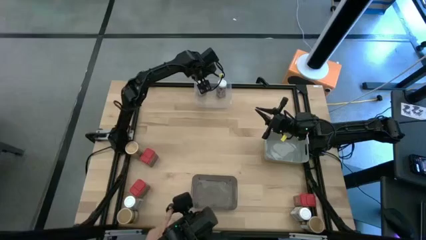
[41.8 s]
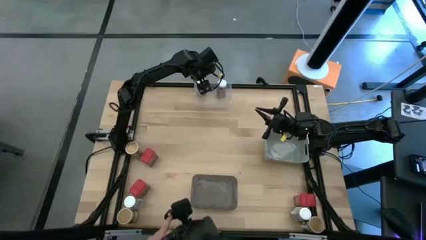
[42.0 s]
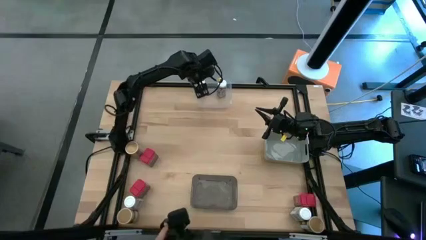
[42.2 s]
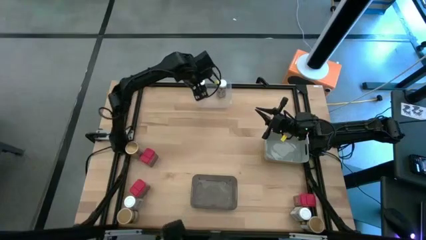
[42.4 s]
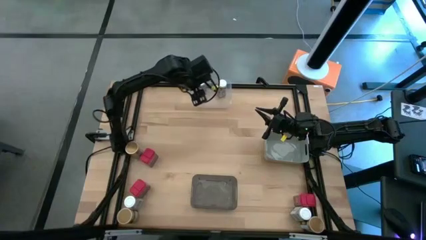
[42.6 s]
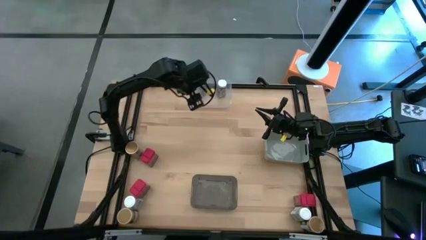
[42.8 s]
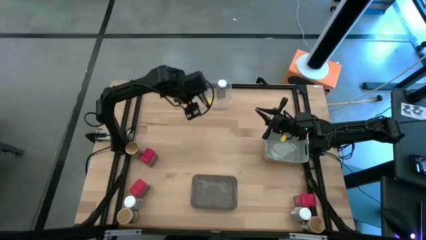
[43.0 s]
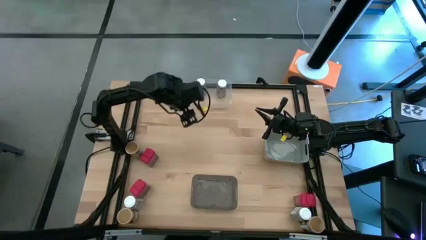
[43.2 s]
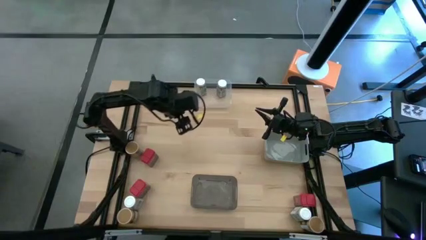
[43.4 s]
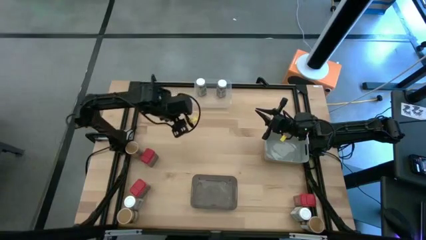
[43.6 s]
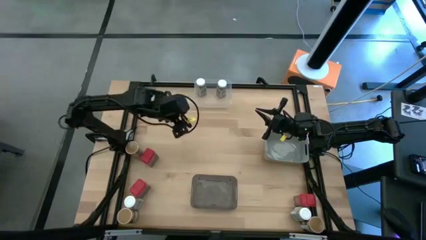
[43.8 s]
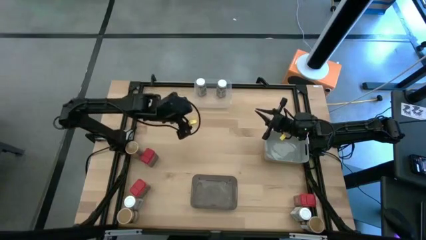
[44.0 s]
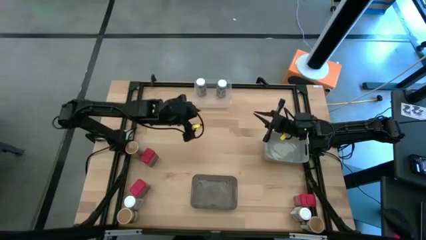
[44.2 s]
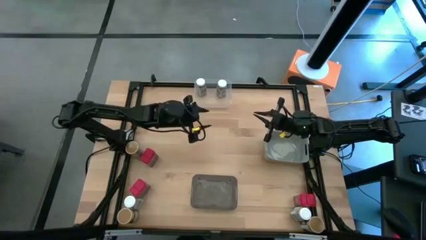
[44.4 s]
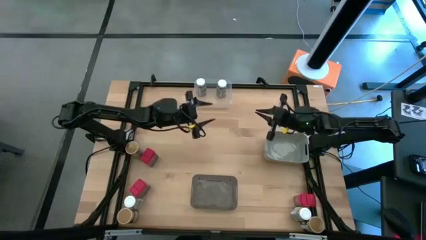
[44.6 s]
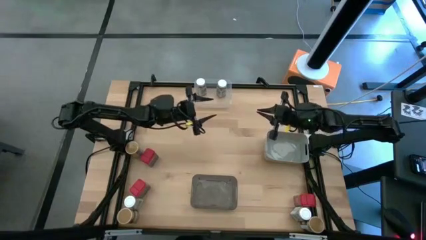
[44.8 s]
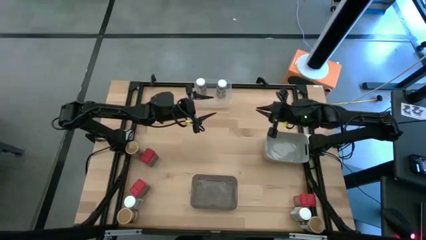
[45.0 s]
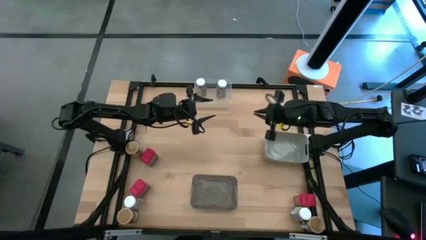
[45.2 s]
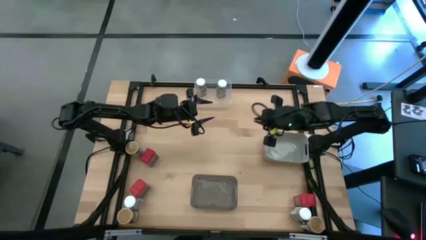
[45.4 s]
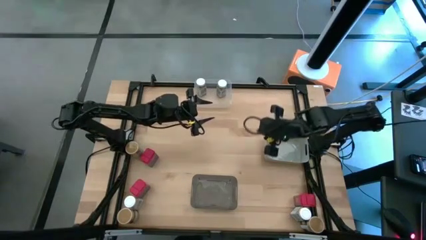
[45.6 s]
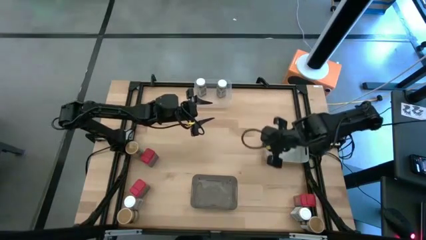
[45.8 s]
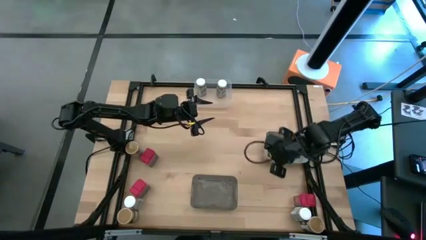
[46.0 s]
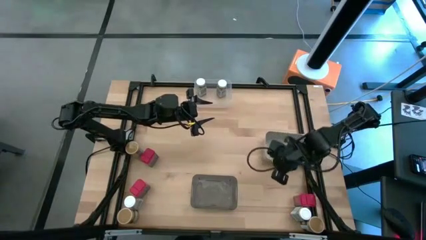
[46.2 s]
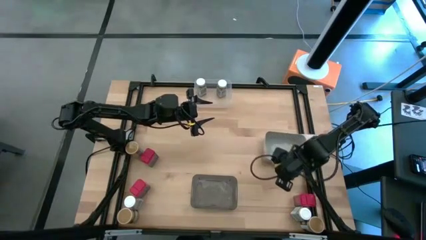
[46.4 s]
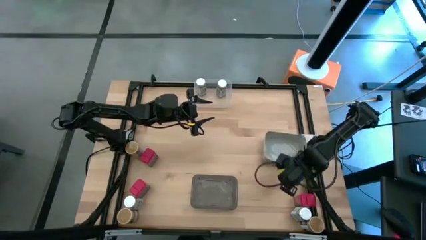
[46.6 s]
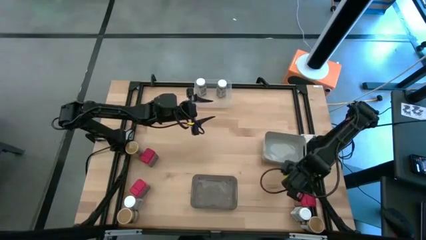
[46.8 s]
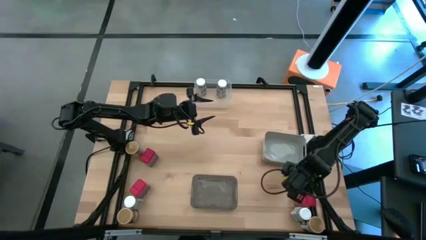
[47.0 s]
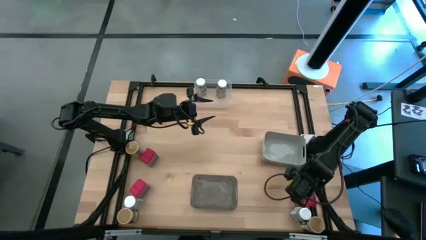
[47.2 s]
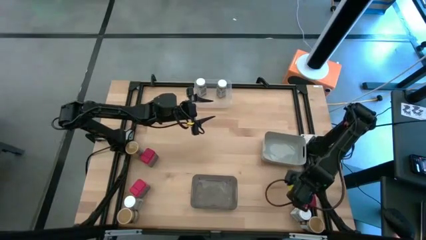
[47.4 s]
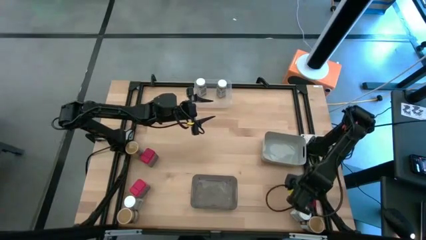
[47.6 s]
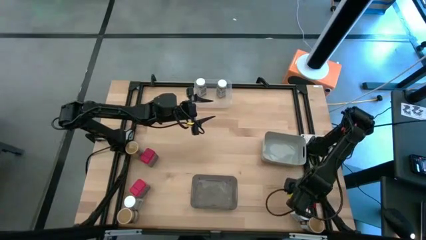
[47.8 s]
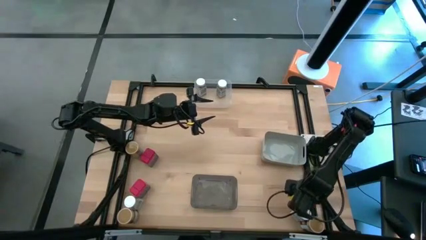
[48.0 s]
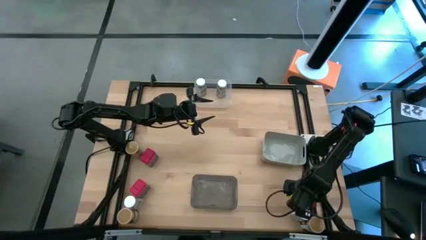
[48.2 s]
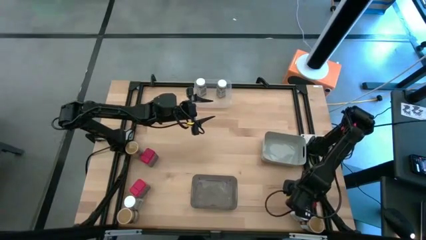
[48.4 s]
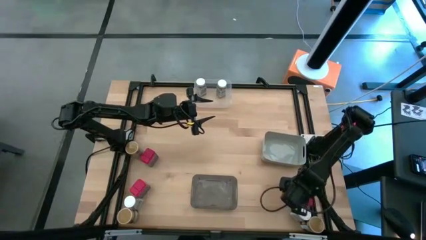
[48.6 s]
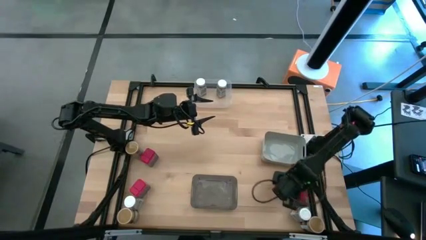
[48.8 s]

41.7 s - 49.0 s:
Task: Sort spices by type
Put the red seasoning can into the gray bin

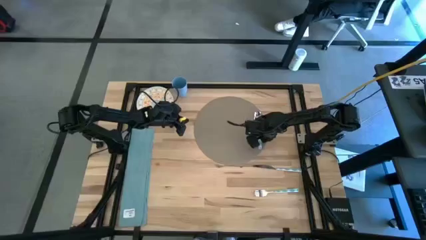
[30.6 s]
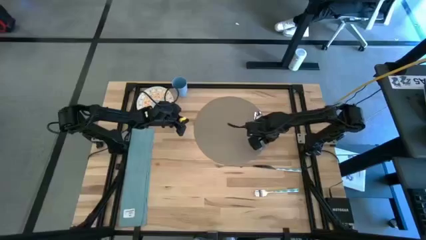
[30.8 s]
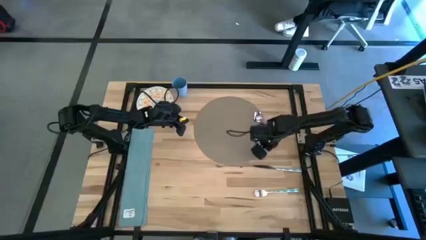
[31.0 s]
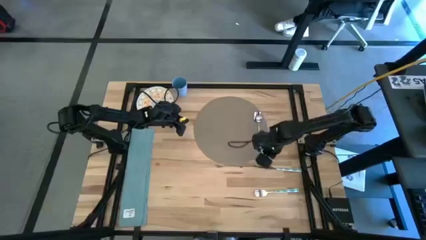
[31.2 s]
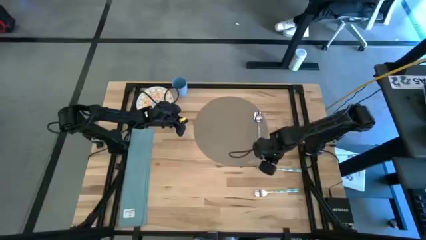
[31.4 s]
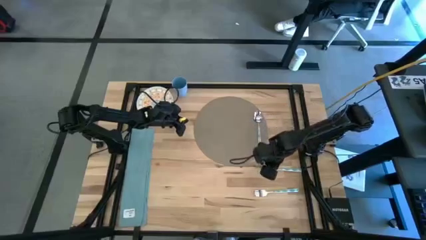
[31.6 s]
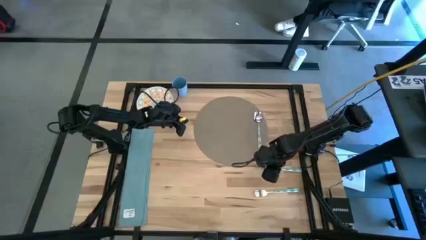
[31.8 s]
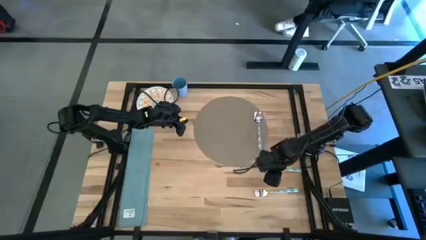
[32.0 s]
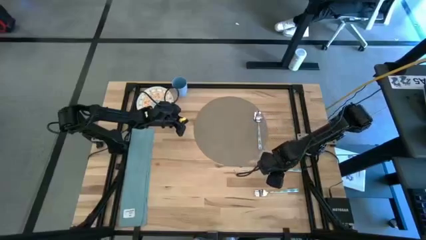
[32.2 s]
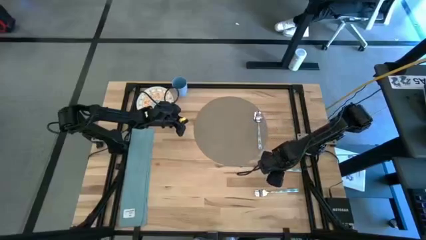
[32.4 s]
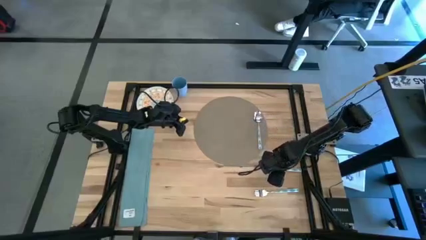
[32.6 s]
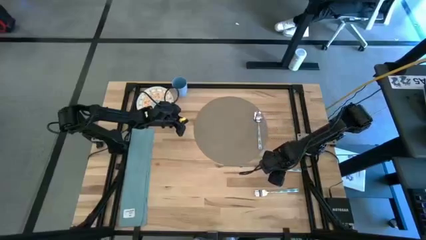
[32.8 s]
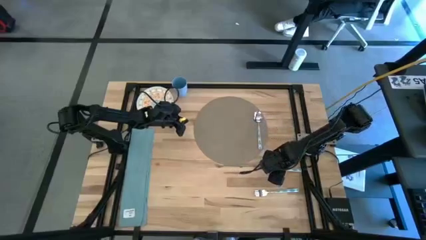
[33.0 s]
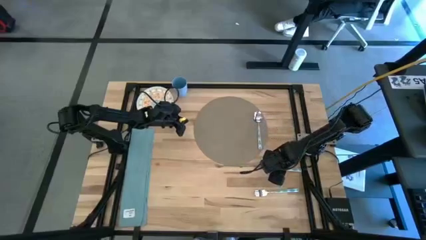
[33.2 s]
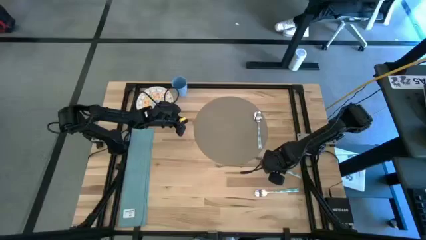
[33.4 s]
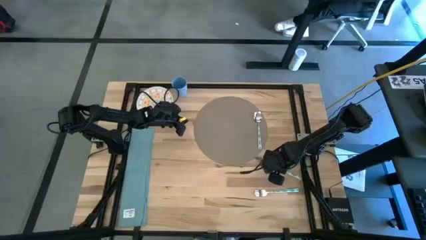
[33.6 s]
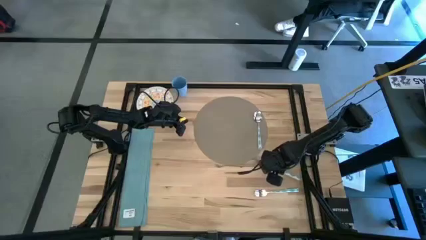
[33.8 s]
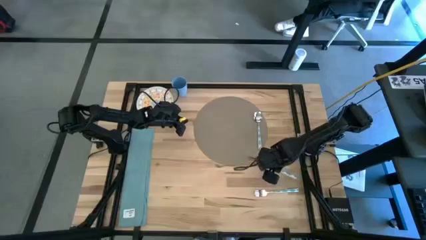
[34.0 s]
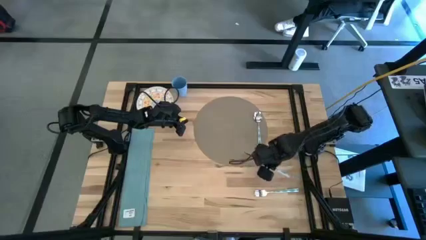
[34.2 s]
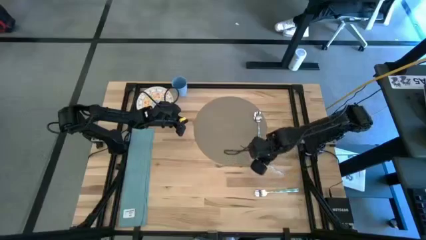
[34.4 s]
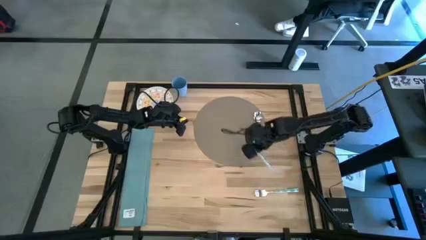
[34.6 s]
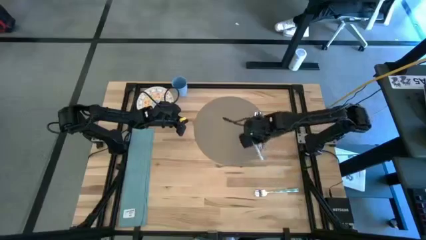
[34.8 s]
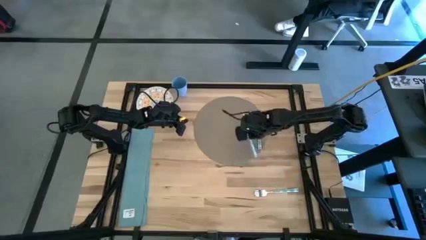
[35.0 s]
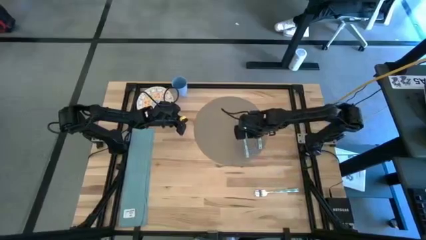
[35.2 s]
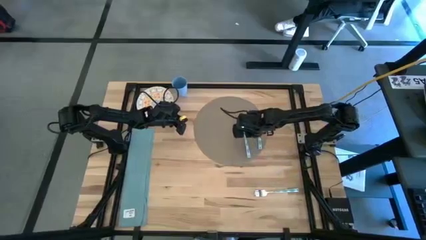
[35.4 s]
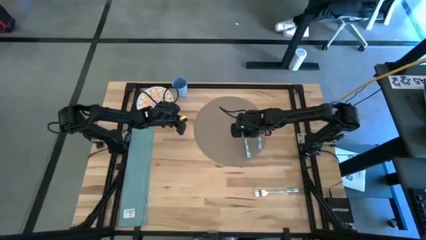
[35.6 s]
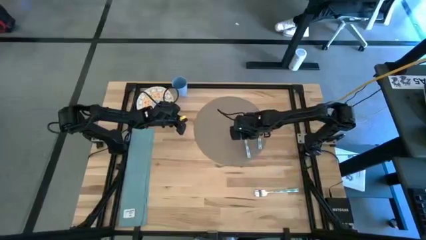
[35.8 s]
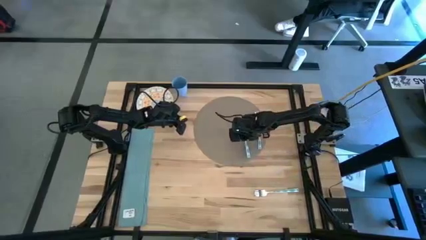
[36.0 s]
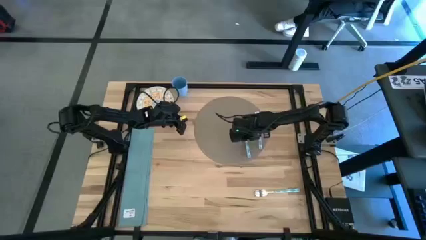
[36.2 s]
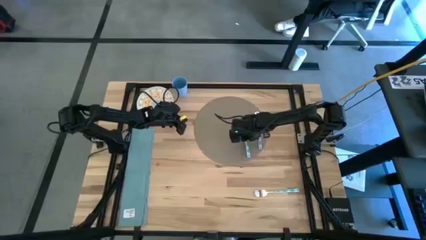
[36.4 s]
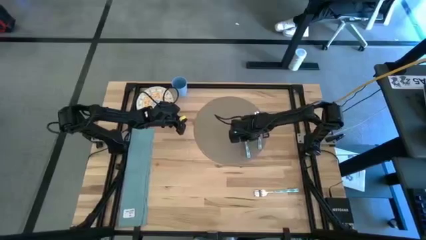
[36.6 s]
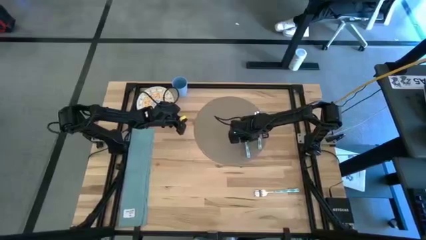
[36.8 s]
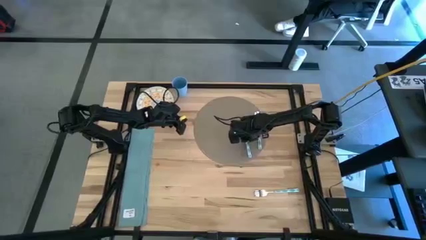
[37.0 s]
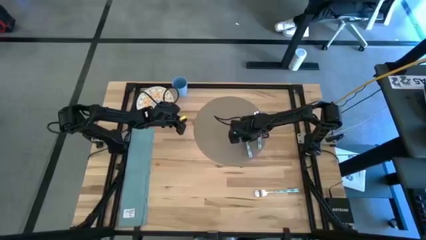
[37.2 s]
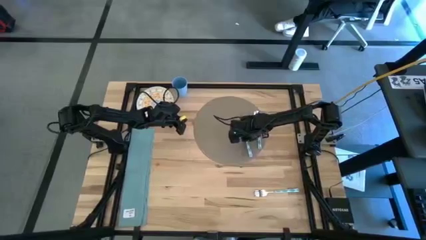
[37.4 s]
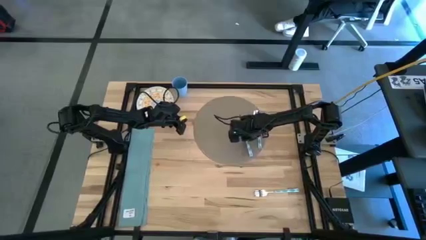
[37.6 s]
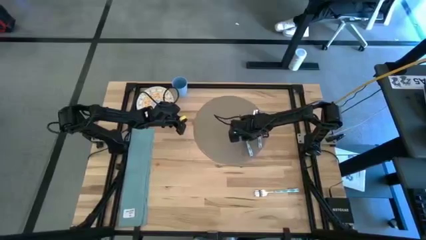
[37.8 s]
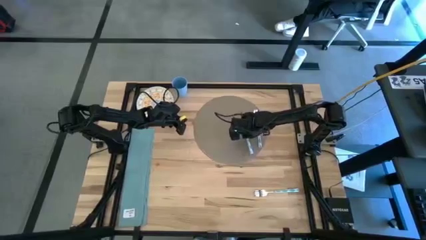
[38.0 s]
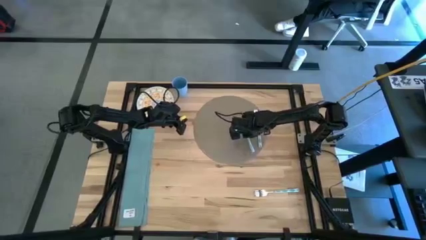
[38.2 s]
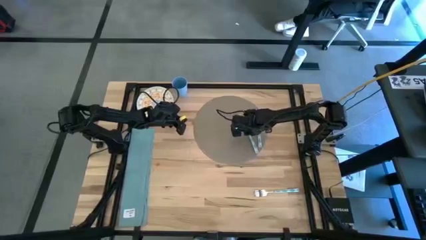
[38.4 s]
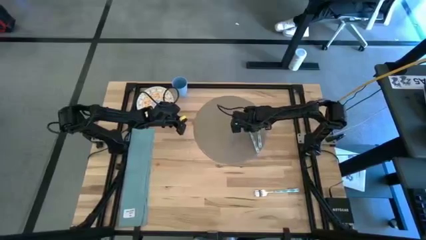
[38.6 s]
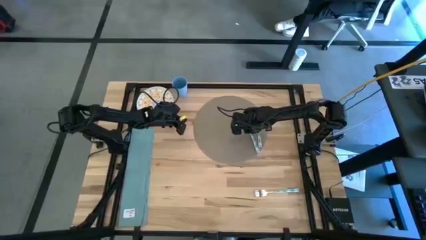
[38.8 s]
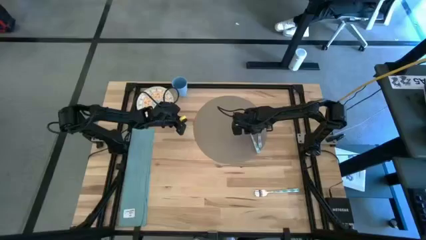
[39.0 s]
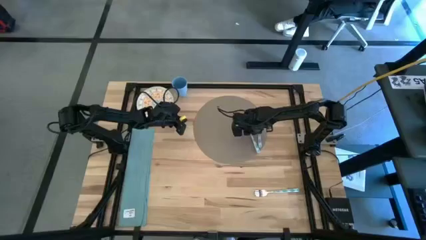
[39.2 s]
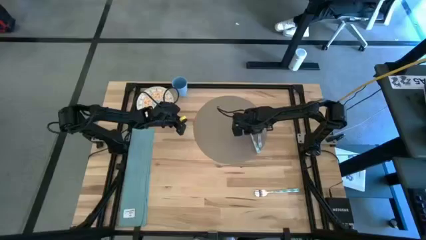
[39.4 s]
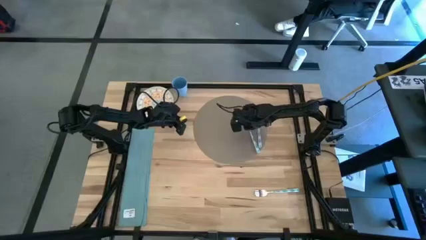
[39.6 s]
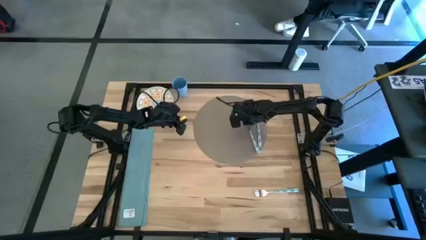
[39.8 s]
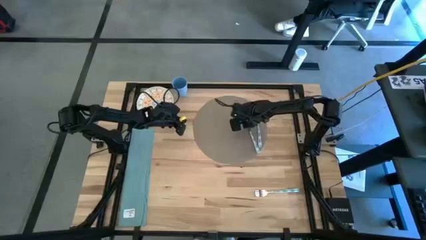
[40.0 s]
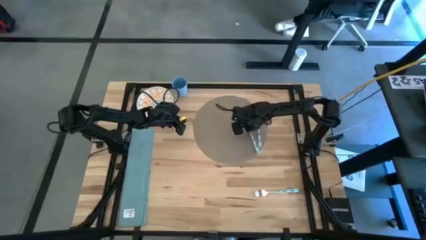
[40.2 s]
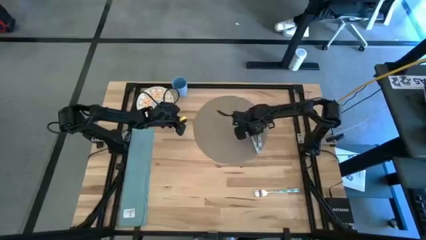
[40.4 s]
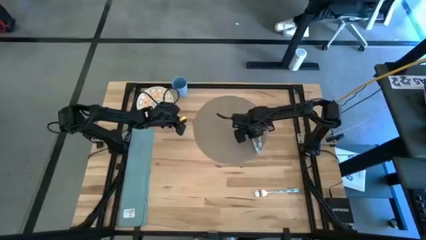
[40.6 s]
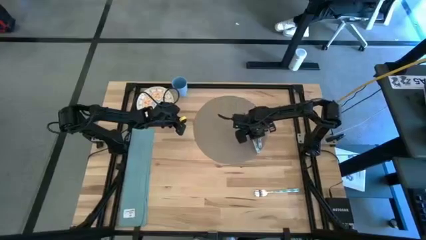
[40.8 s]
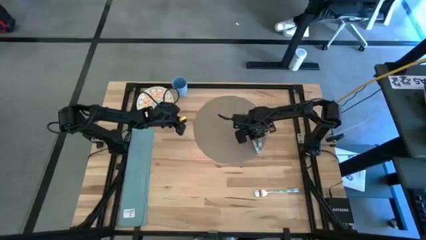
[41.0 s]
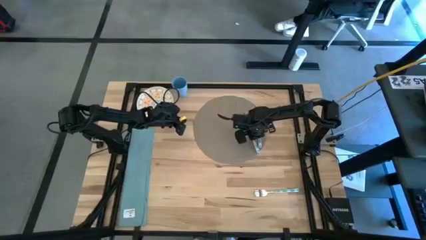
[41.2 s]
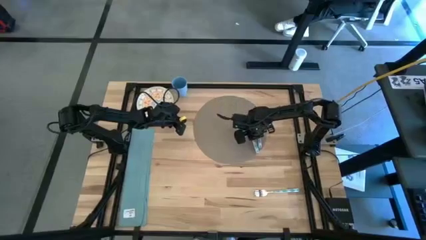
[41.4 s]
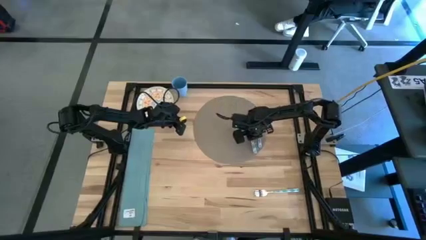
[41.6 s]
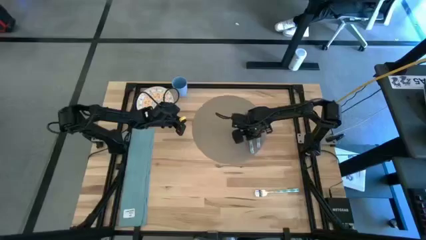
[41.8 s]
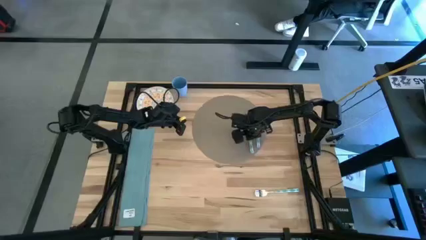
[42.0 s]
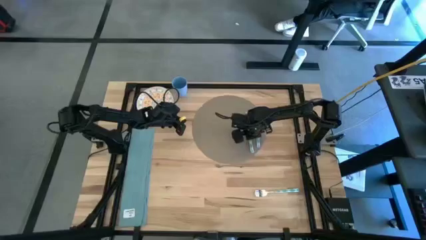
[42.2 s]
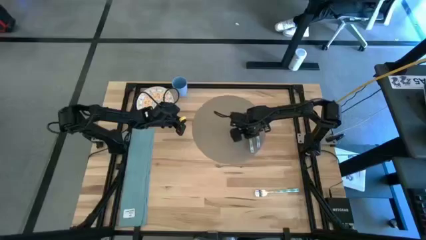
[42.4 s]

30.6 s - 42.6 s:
Task: Set table place
Put the blue knife on the brown mat
